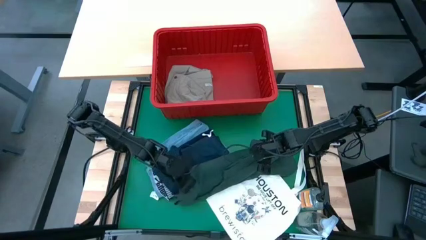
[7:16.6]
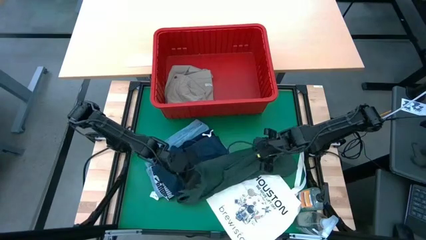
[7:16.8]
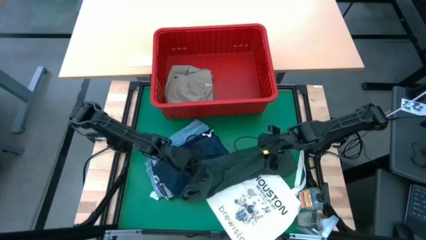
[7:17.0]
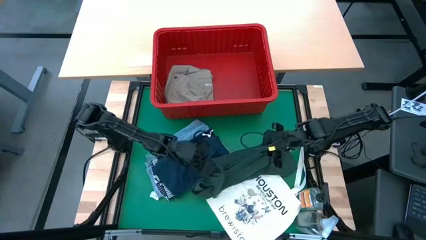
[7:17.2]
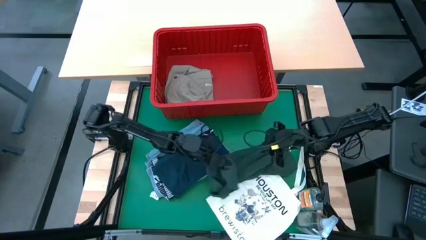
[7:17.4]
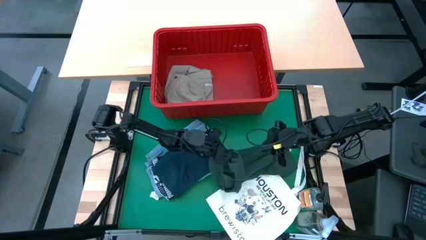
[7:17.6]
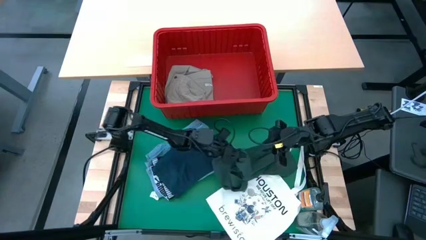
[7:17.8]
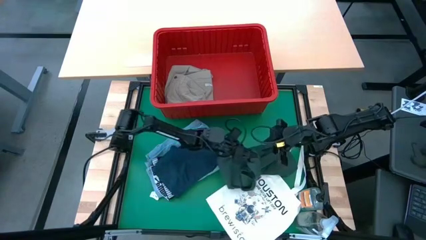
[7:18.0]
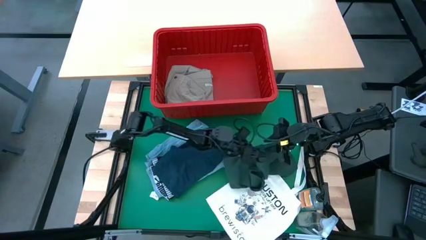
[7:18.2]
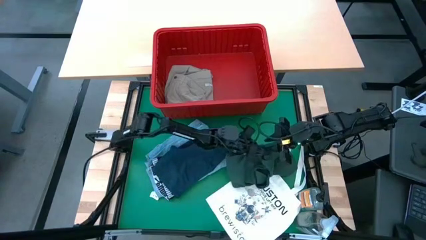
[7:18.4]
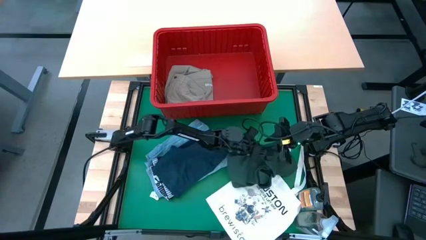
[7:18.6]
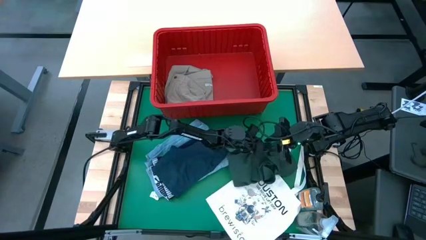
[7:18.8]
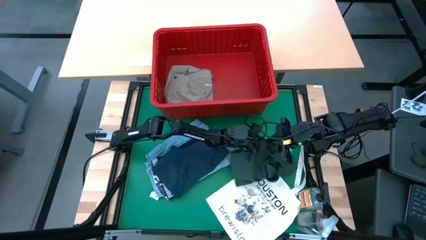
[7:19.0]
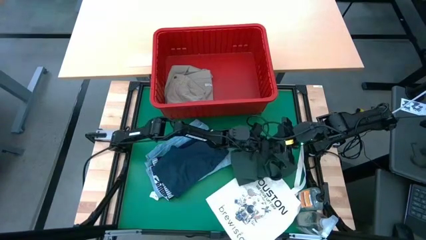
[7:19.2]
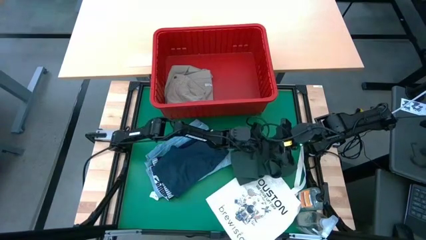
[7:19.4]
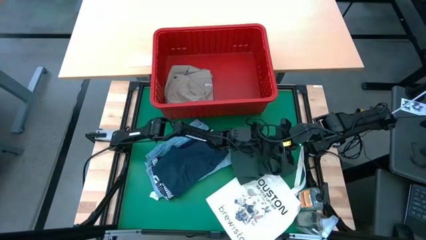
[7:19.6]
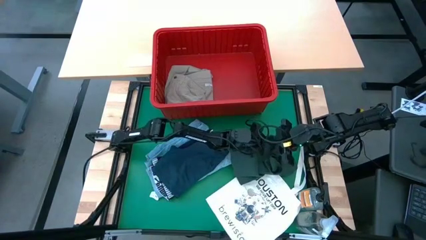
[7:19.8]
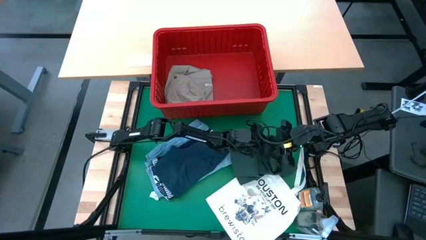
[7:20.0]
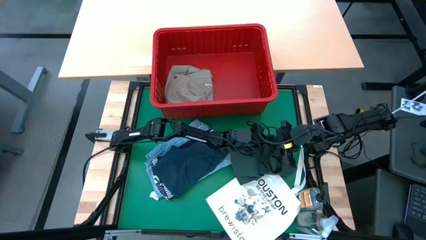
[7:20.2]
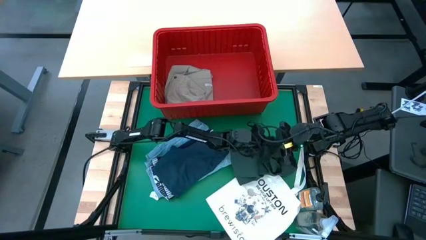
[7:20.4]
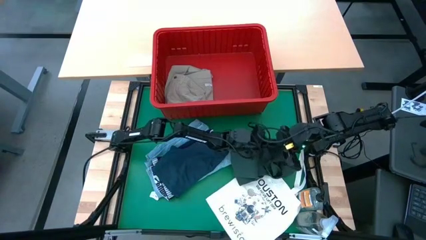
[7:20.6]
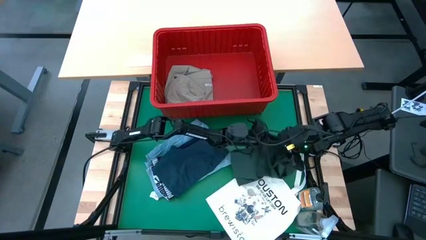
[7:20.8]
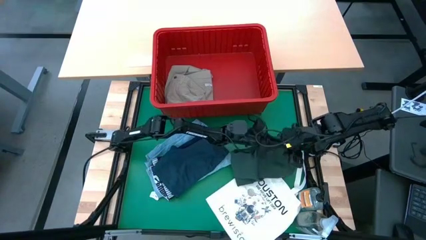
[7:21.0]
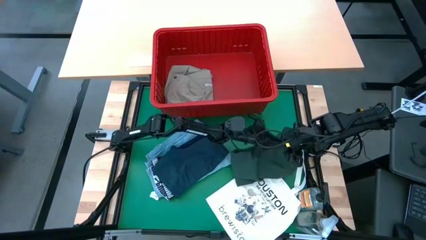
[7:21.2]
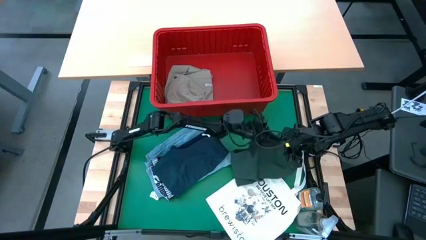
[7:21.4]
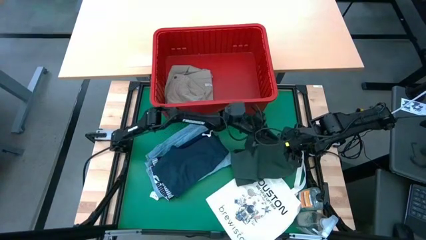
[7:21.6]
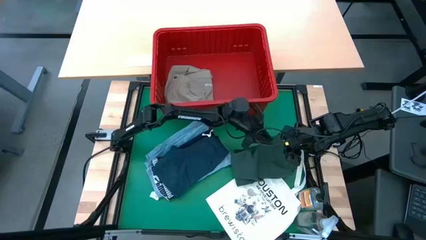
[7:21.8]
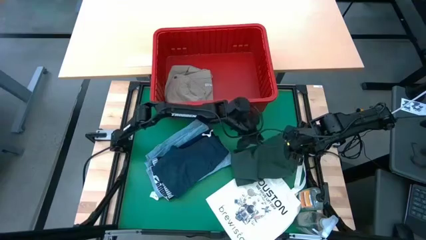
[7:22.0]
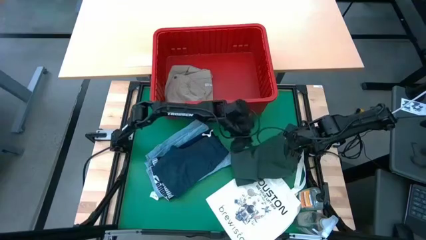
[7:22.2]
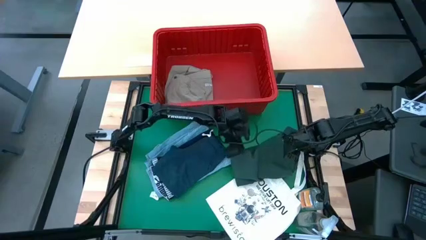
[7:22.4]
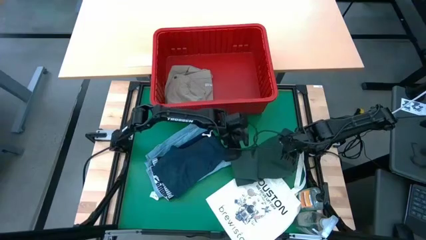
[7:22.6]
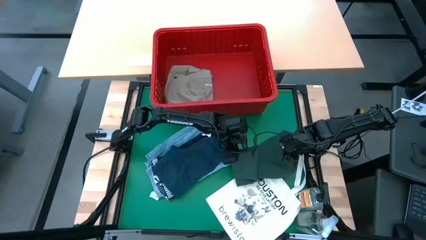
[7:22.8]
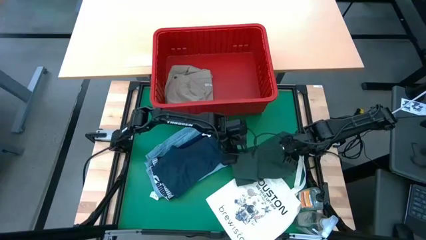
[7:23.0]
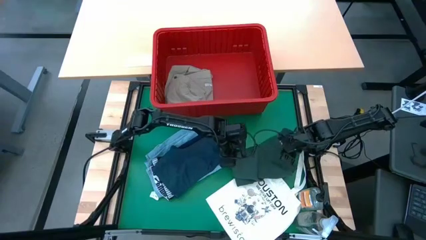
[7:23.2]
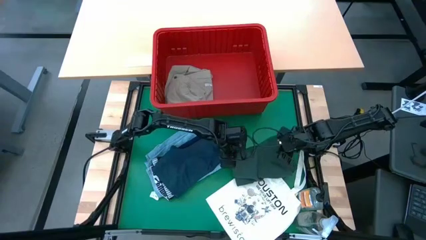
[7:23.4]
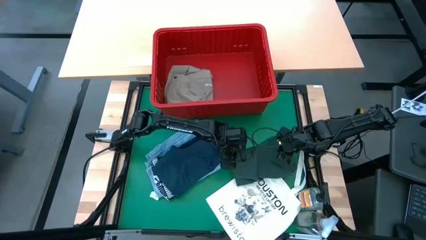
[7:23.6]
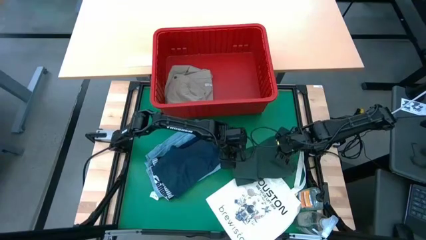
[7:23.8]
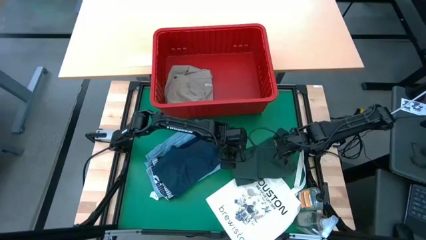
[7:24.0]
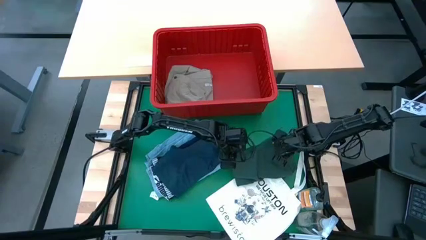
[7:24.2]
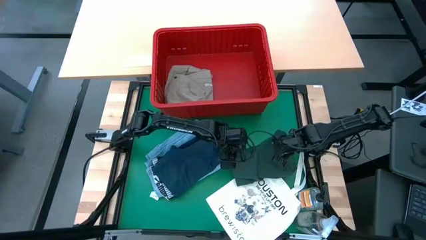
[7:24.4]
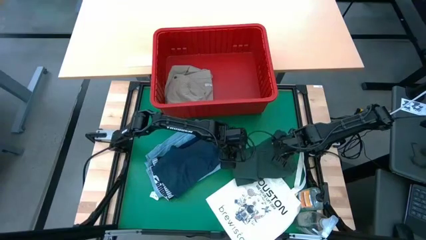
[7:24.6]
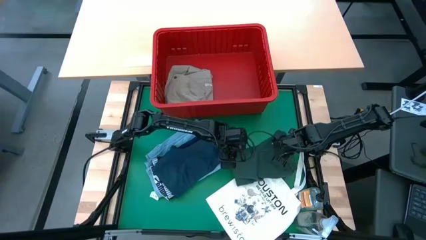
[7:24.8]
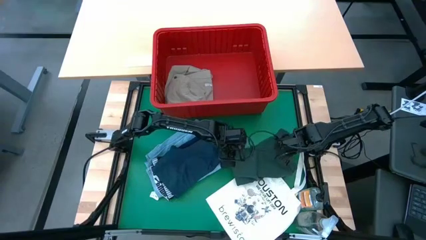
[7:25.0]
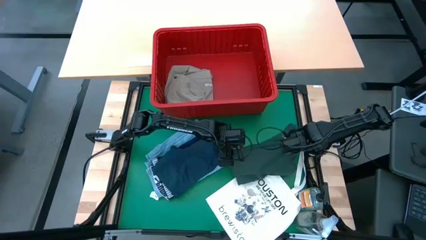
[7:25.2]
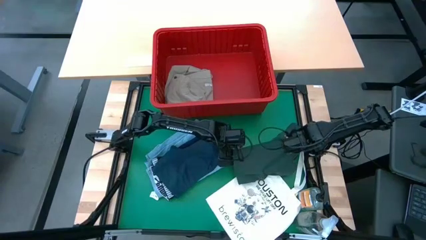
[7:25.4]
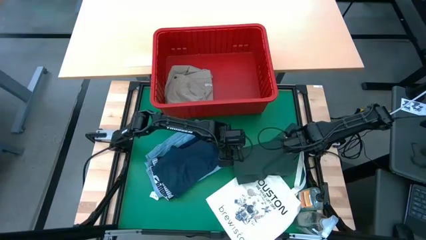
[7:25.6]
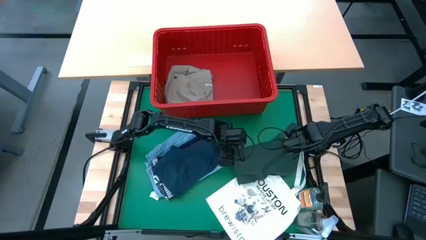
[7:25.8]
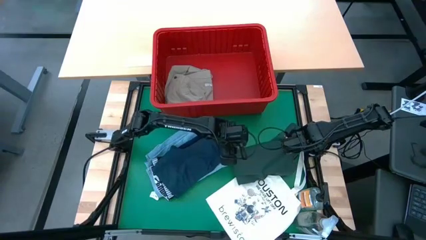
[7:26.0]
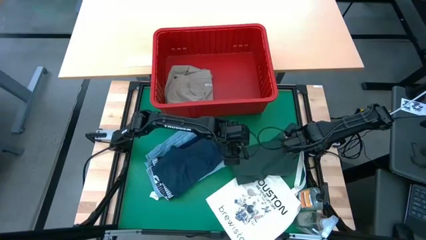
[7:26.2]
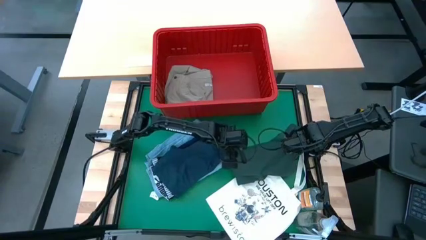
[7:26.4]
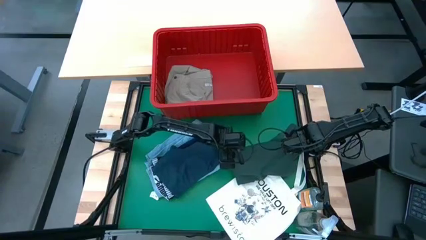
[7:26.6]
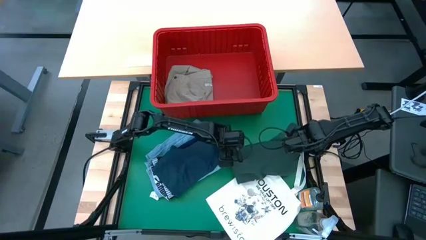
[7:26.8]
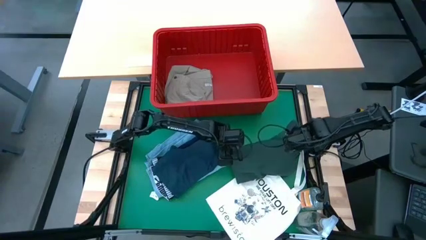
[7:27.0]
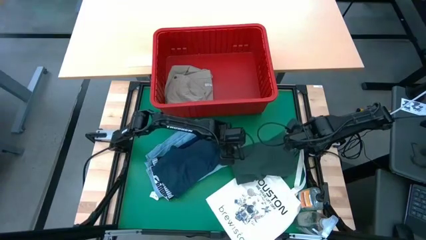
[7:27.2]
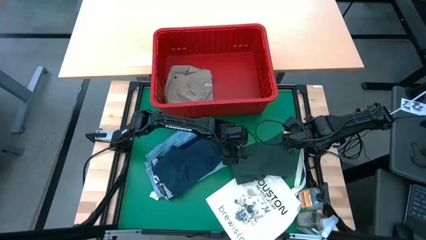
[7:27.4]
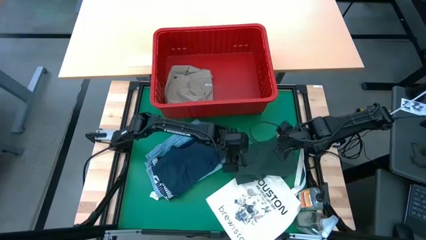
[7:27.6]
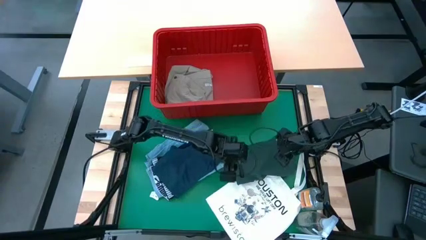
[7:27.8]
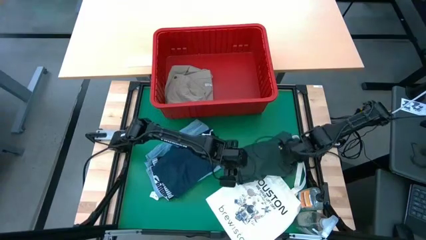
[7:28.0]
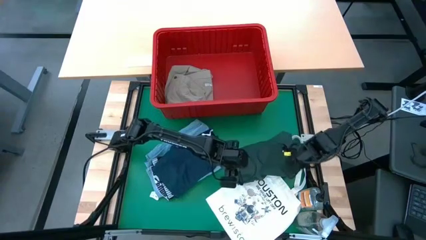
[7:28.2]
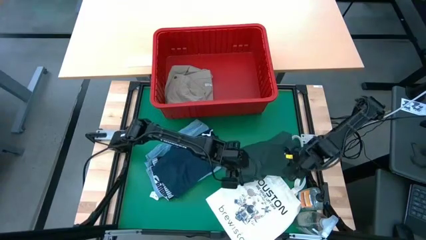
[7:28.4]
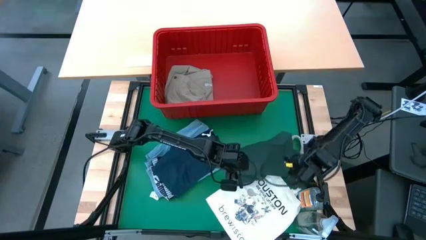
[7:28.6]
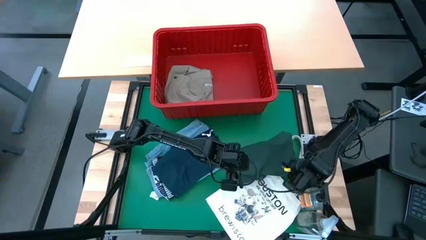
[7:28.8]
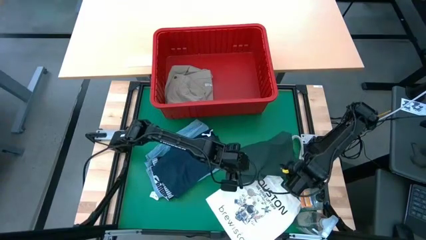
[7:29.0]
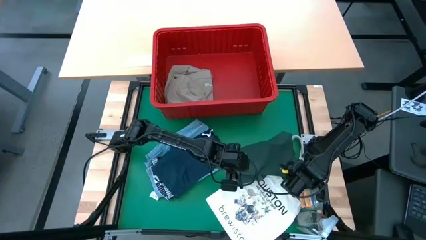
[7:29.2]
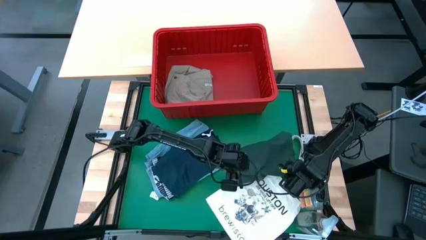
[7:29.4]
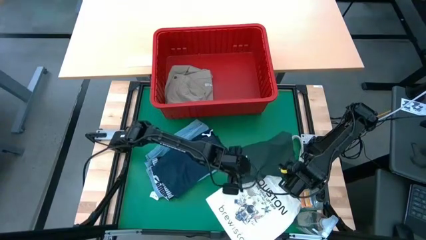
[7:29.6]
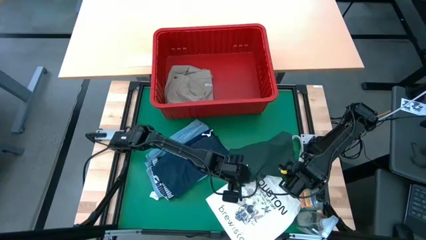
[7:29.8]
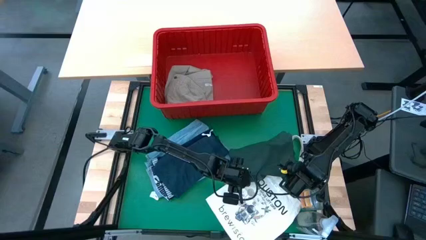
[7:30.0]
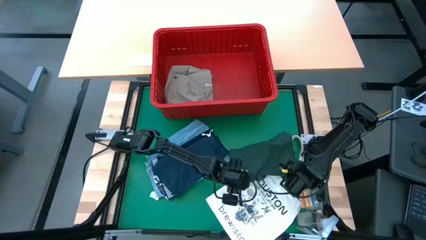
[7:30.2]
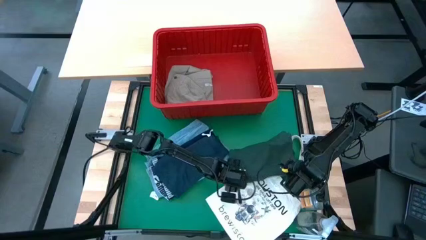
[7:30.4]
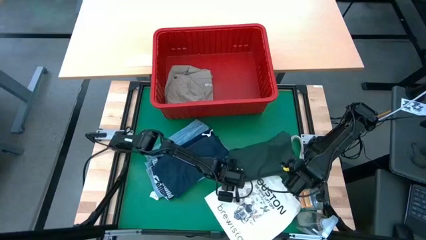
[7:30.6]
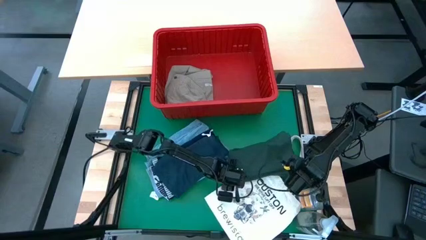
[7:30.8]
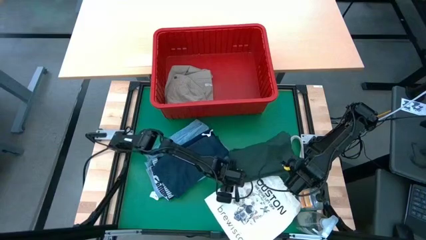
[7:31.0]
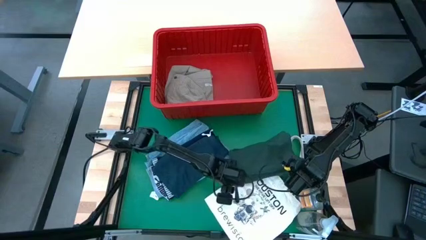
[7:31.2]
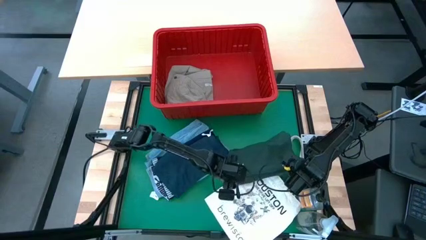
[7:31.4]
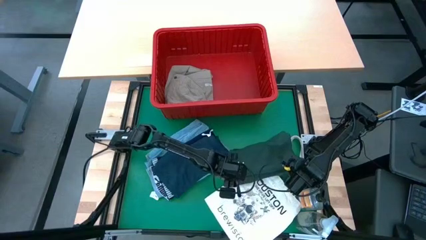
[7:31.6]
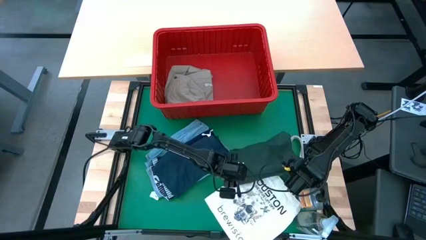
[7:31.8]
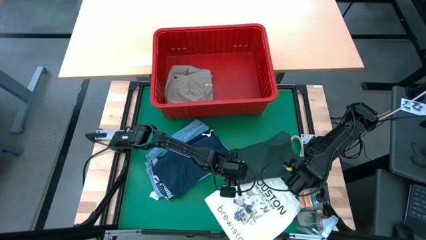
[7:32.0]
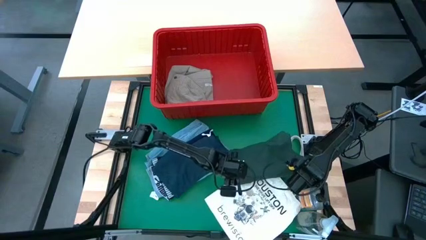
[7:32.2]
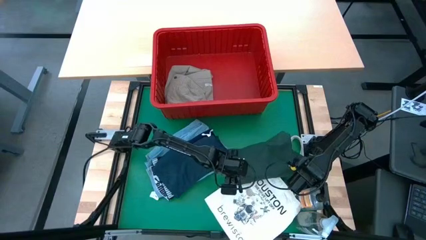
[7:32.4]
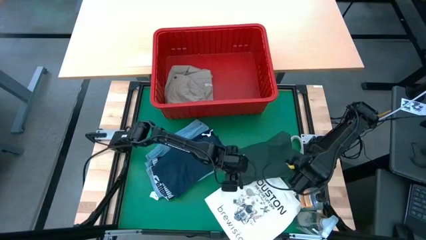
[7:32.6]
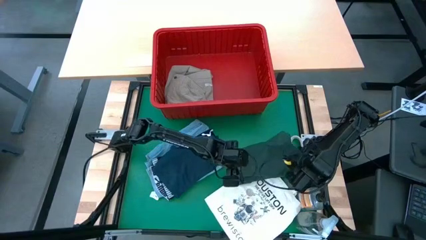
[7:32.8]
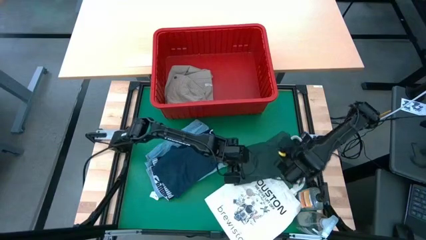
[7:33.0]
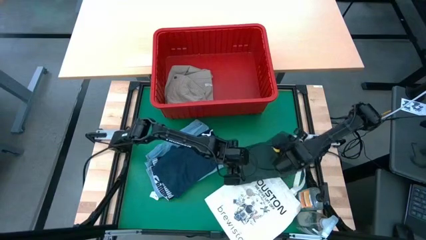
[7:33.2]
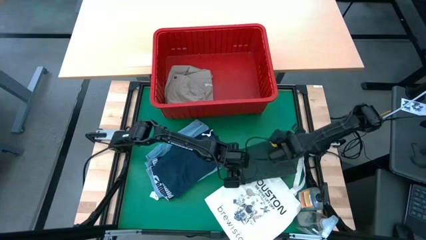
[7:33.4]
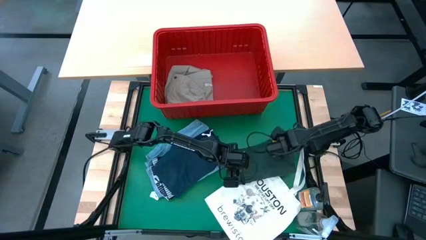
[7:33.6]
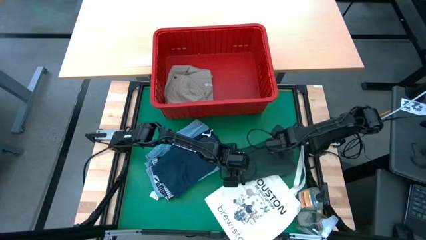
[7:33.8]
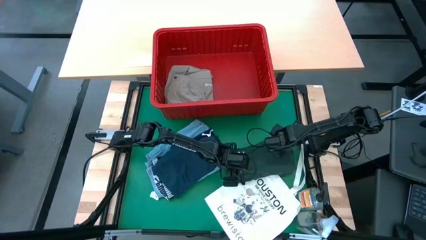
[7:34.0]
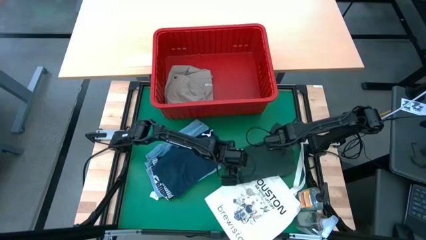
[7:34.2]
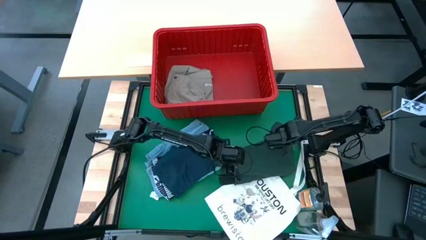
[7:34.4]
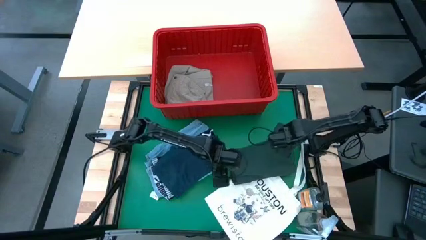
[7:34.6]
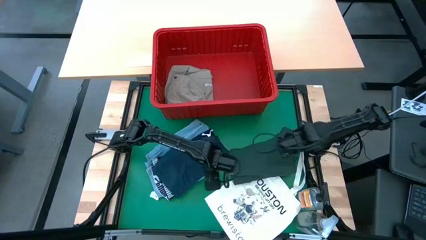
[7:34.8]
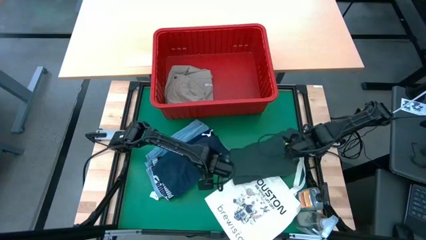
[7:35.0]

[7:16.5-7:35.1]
Task: Fold Laundry from Bin
Fold the dark green polo shirt
